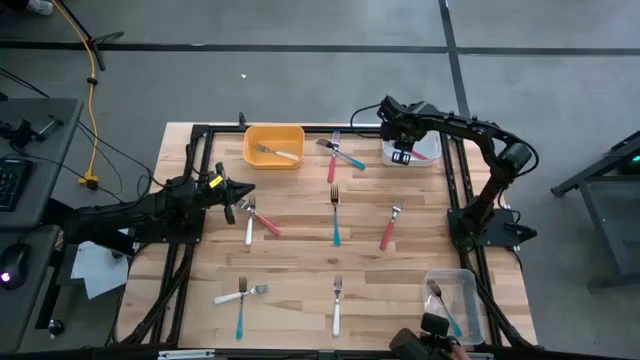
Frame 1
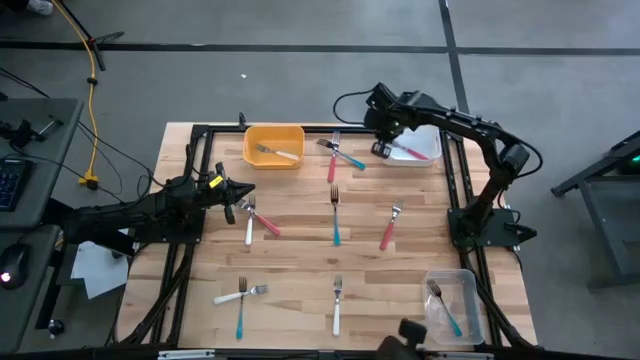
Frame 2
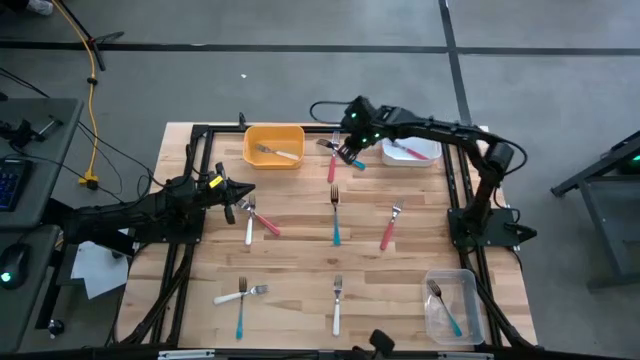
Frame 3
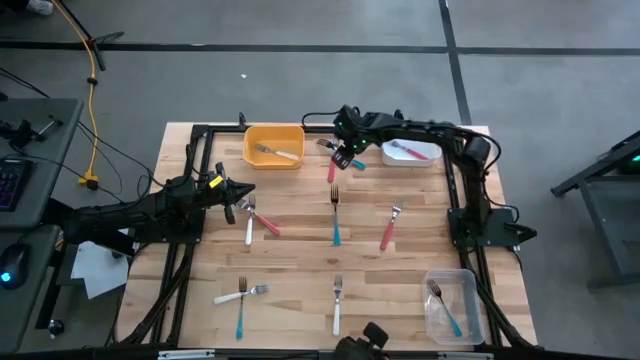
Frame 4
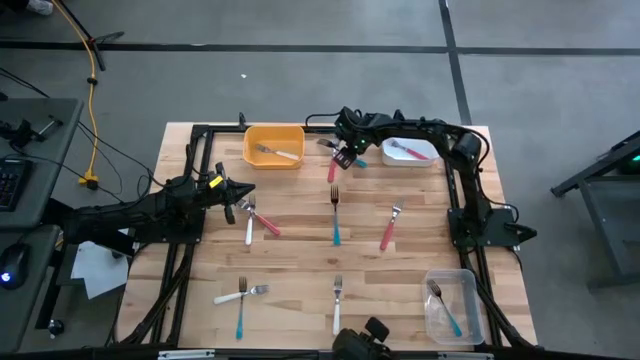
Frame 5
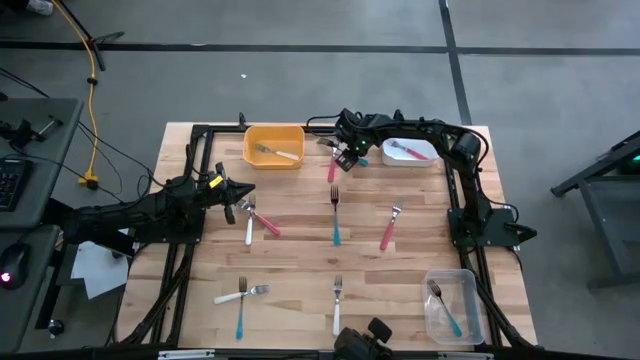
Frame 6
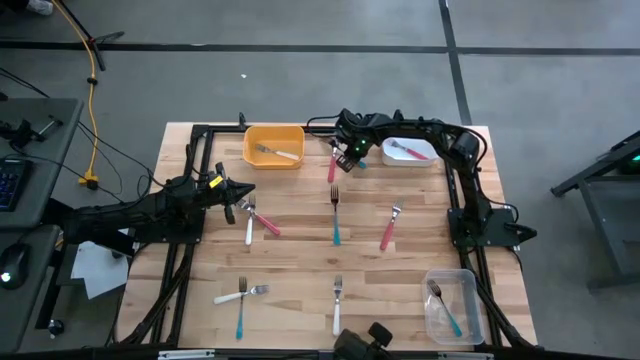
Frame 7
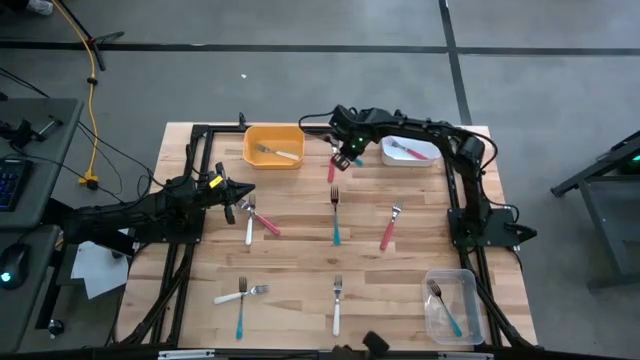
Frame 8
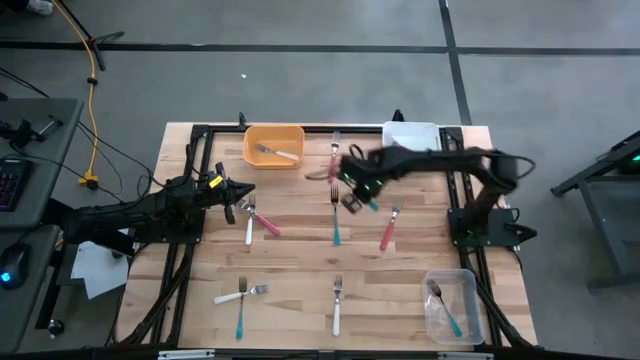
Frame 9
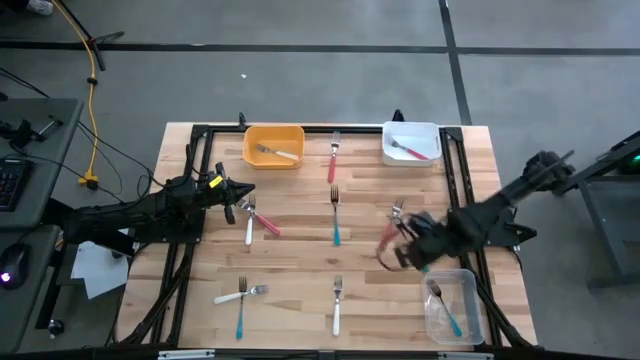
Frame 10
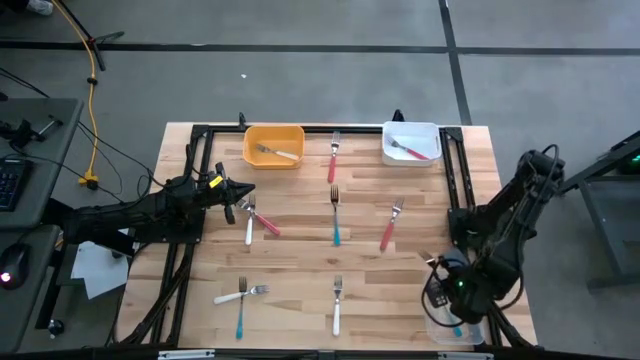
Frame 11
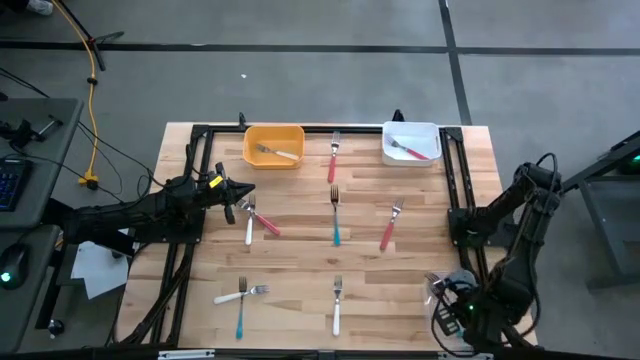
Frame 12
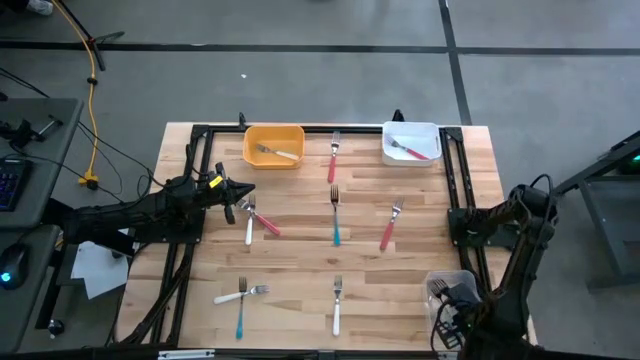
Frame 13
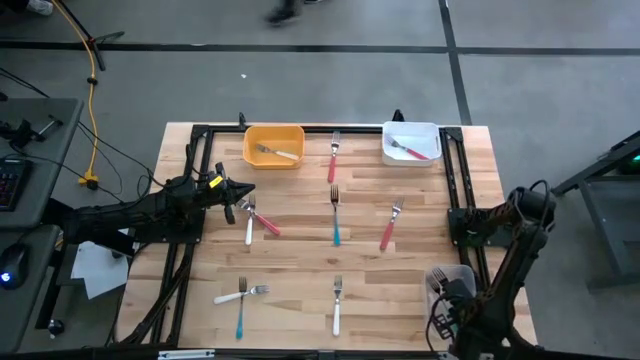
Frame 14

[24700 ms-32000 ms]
Task: Sort silverware by color (type)
Put the top blue fork into the transparent bin

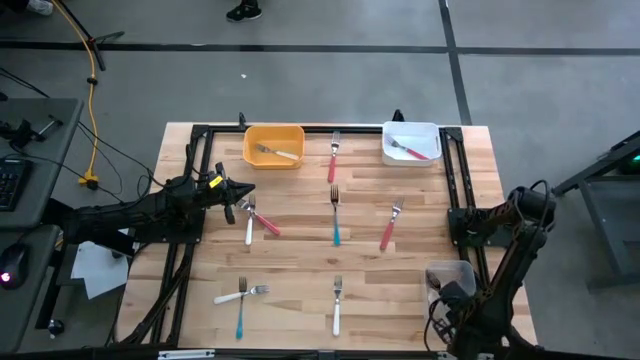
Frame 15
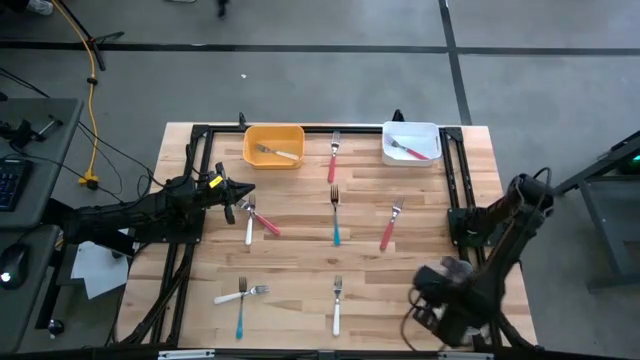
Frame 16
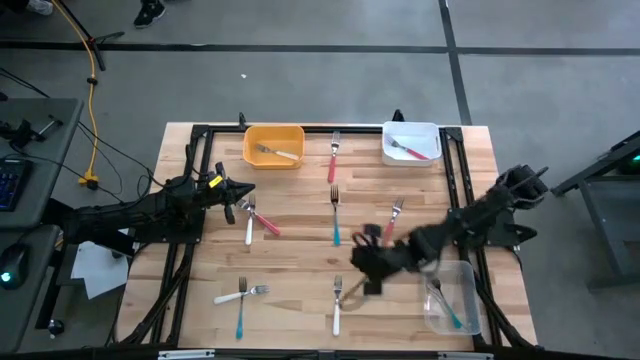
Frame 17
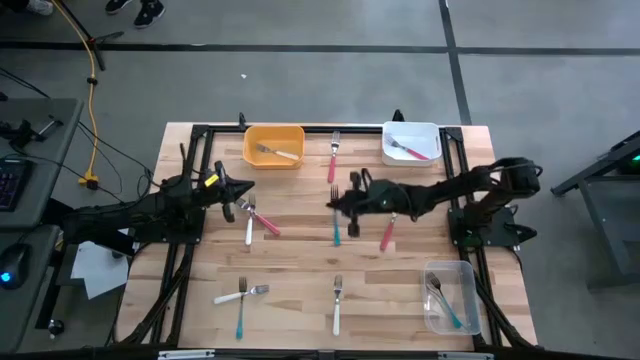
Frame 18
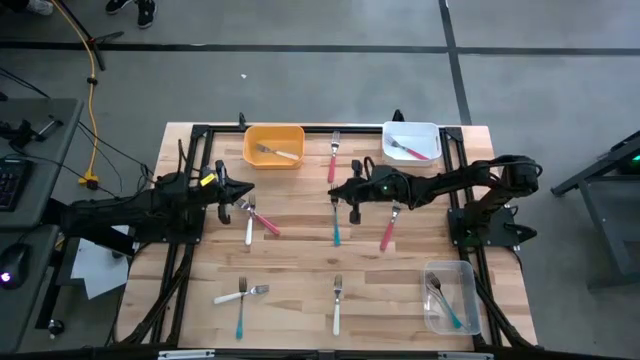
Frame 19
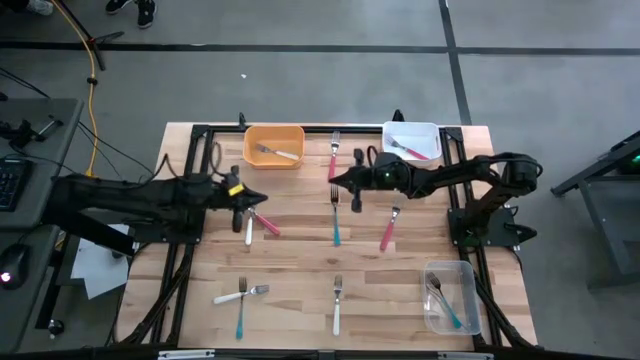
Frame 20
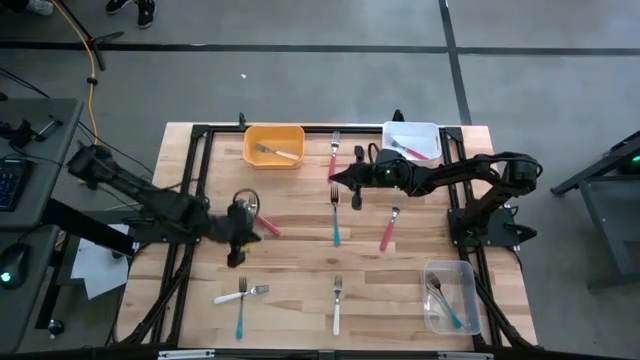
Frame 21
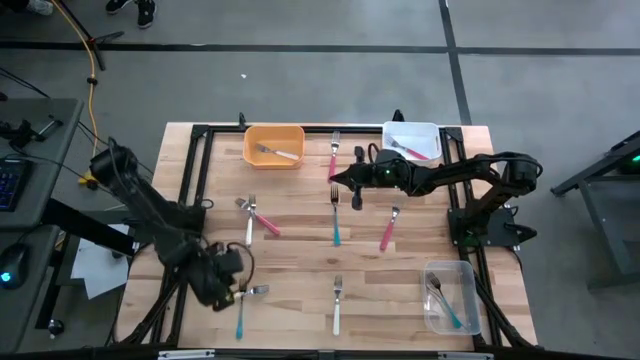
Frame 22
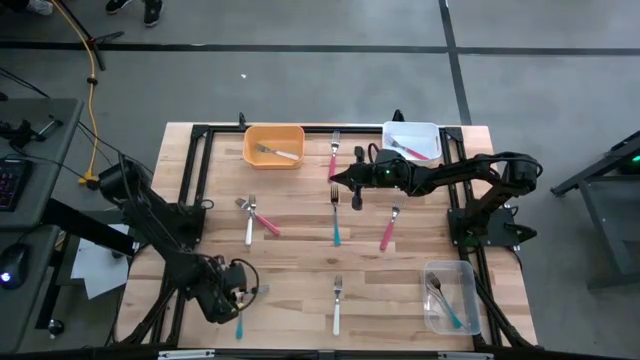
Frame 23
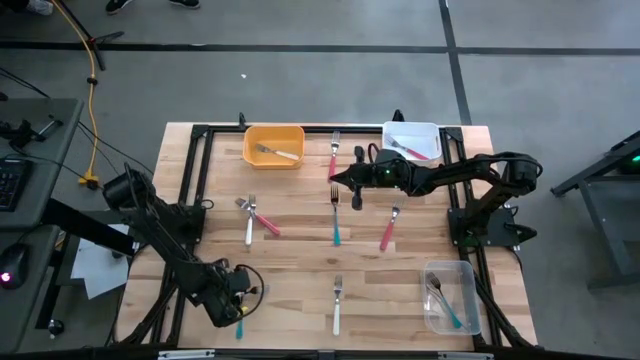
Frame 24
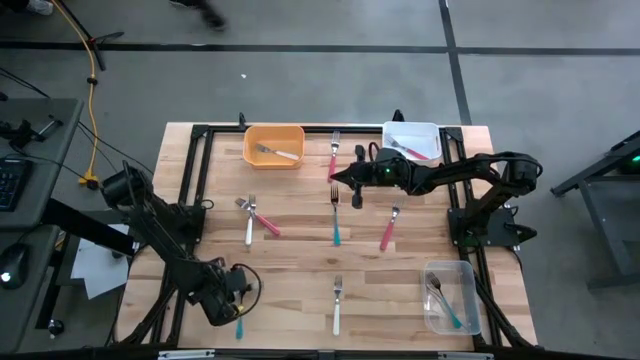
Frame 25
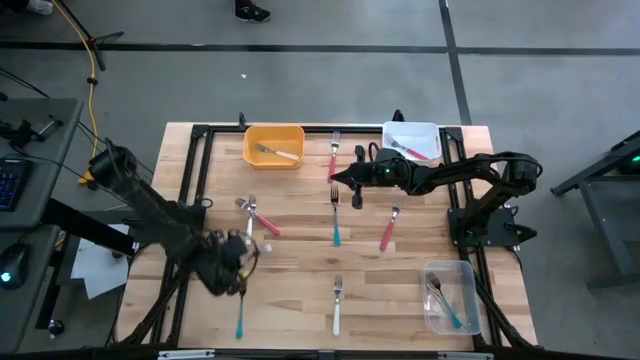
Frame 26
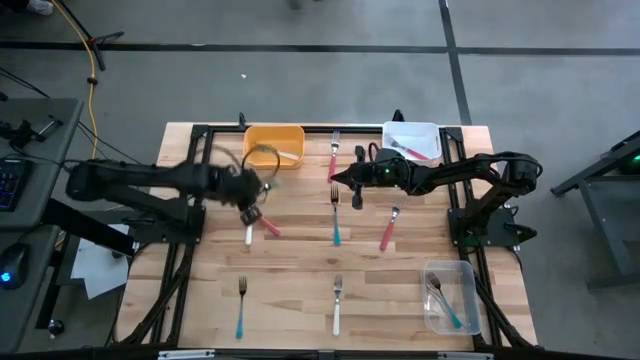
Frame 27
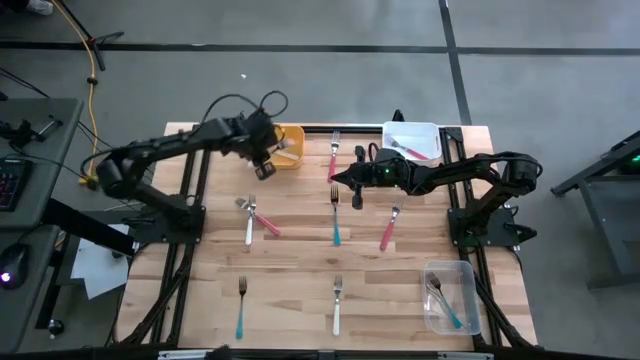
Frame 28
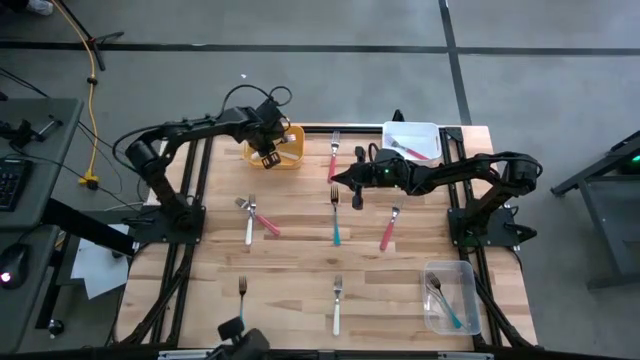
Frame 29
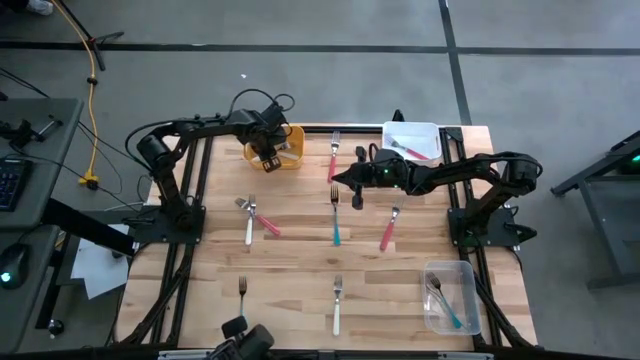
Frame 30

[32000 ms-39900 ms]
Put the bottom left white fork into the yellow bin

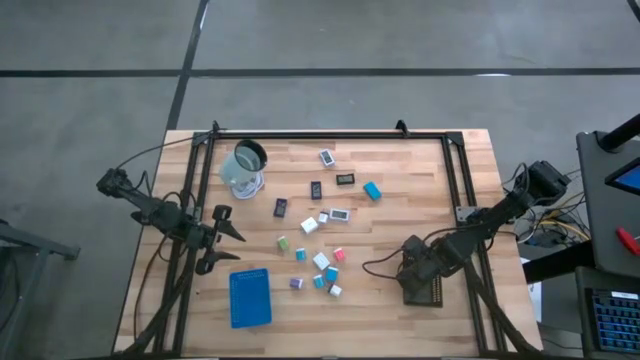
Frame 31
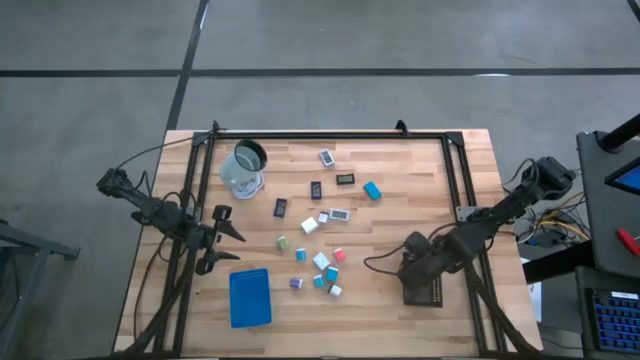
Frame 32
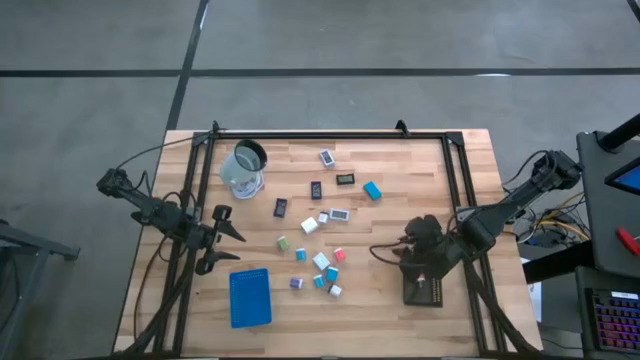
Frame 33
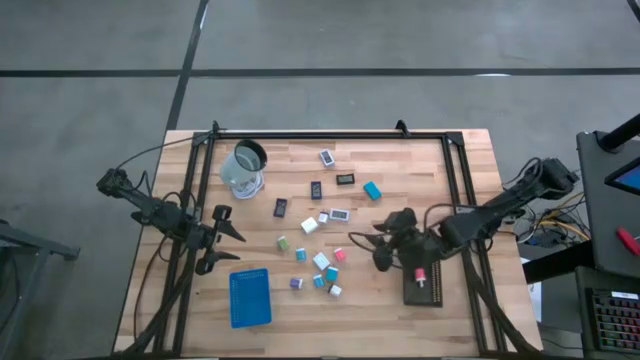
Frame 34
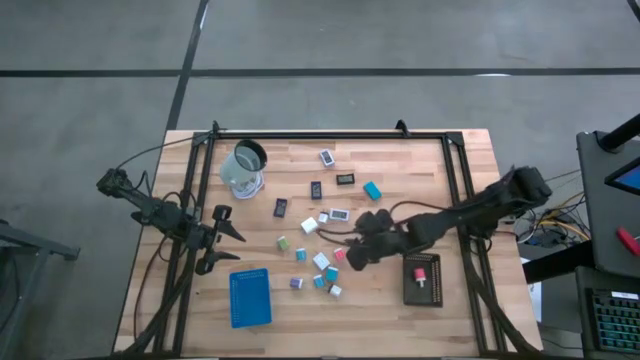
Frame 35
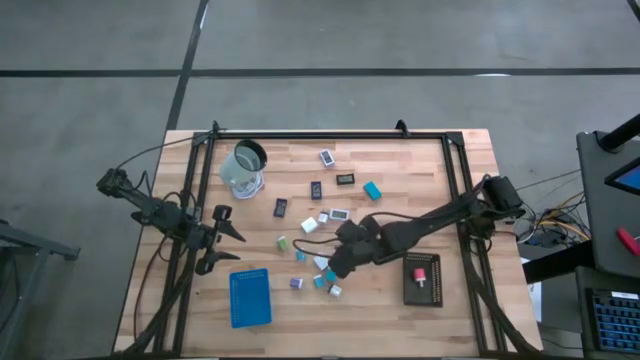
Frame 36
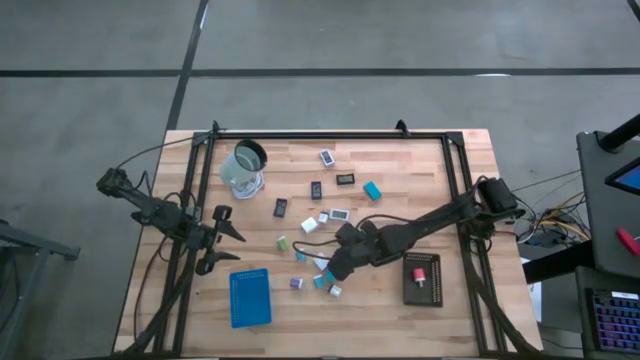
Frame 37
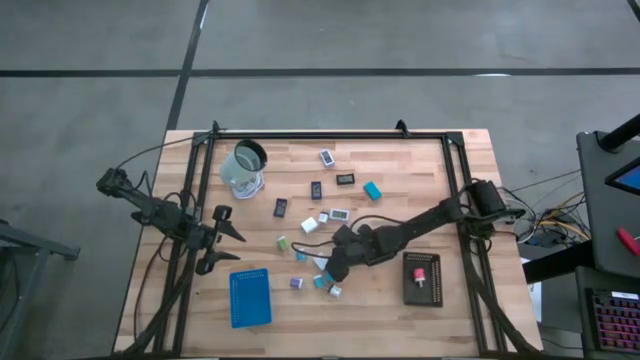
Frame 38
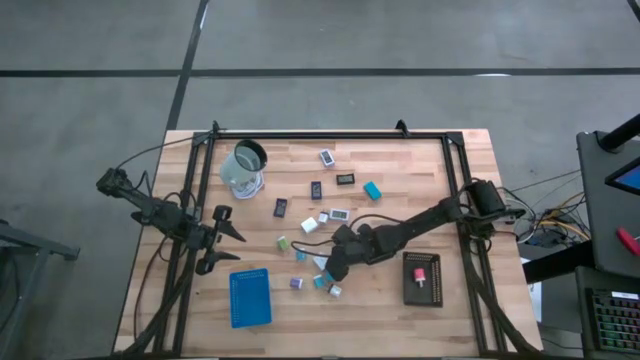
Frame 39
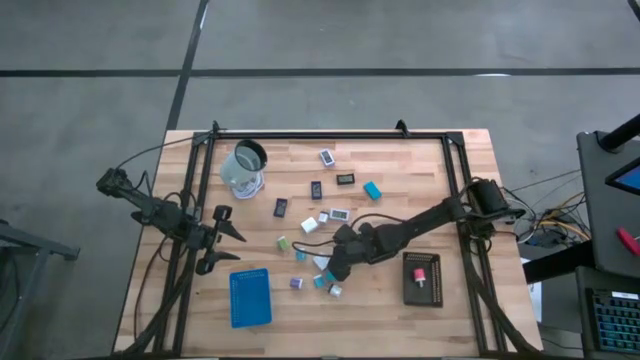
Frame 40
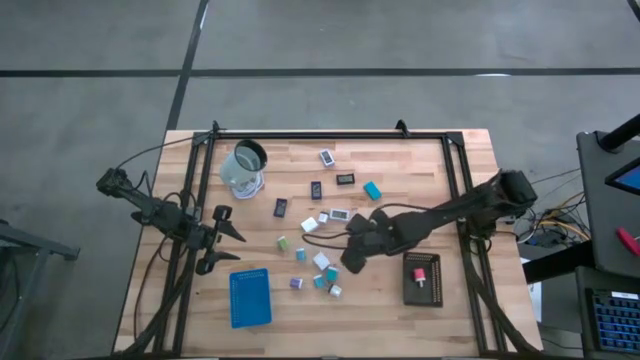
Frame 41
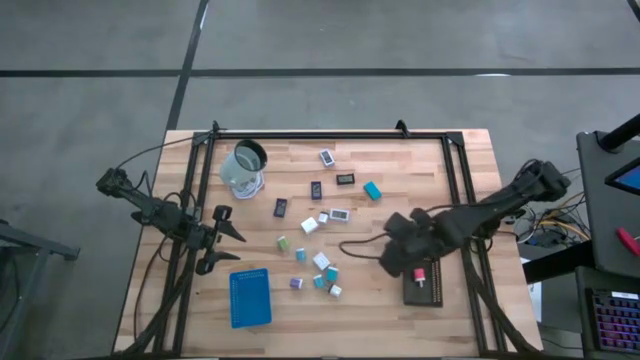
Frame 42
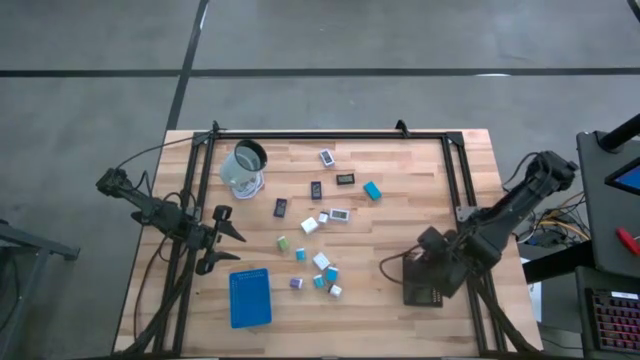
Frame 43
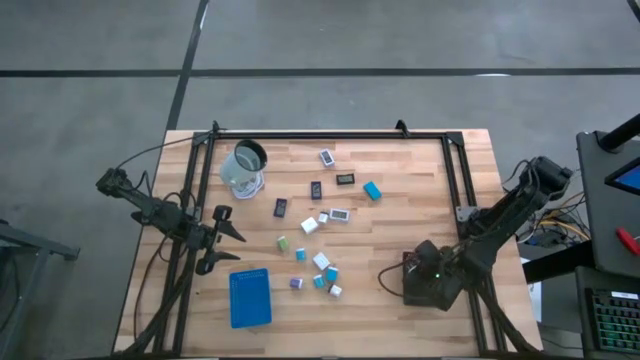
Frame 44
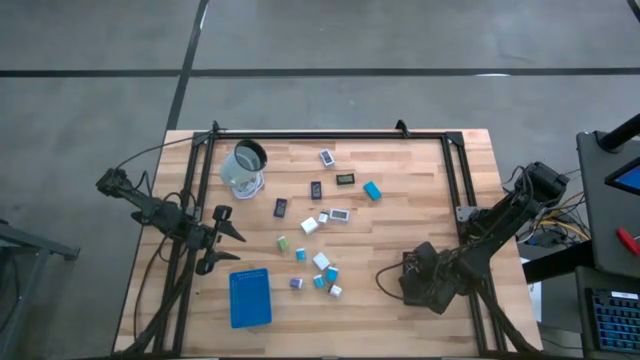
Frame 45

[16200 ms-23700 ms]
Task: Pick & Place Office items
Put the pink charger adapter into the black bin
